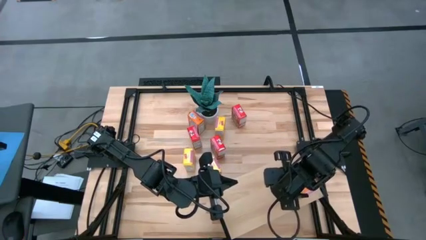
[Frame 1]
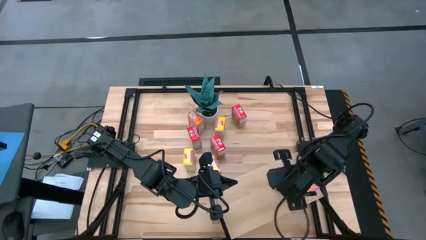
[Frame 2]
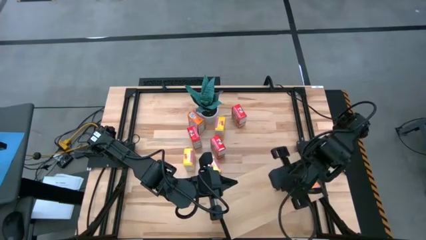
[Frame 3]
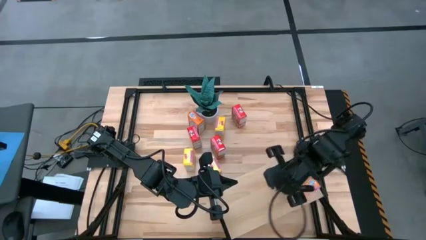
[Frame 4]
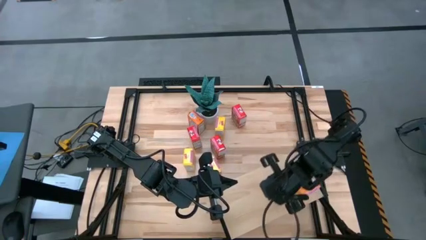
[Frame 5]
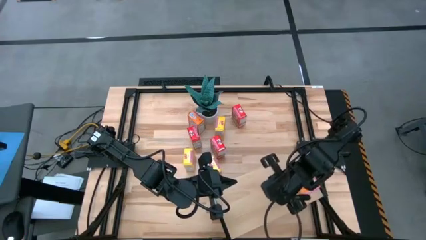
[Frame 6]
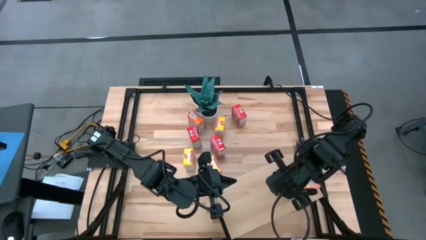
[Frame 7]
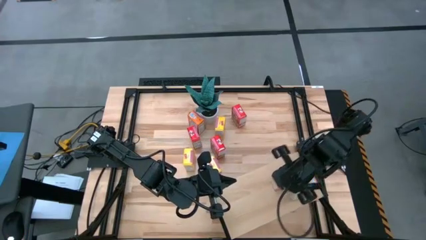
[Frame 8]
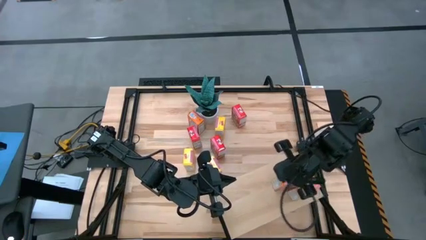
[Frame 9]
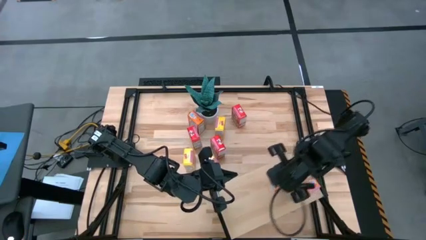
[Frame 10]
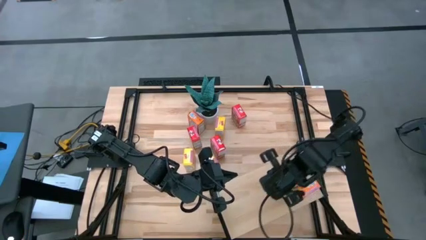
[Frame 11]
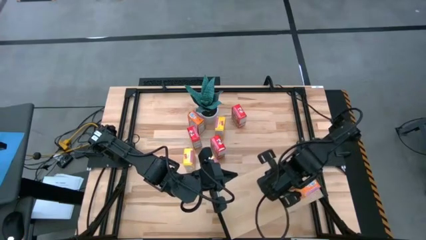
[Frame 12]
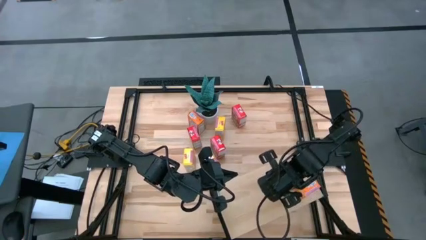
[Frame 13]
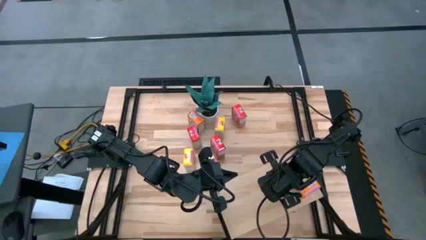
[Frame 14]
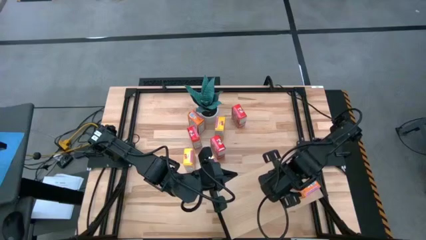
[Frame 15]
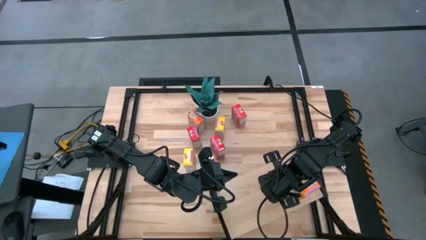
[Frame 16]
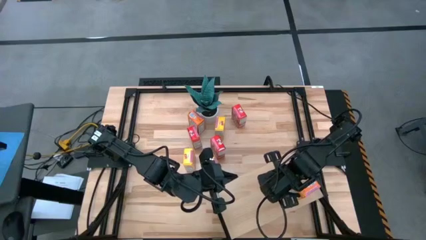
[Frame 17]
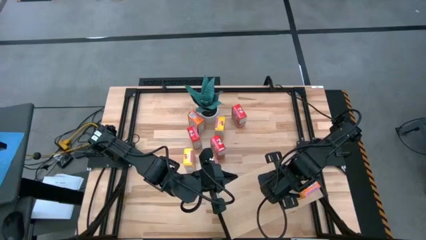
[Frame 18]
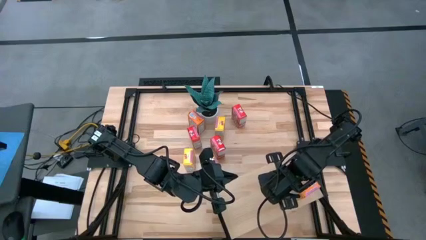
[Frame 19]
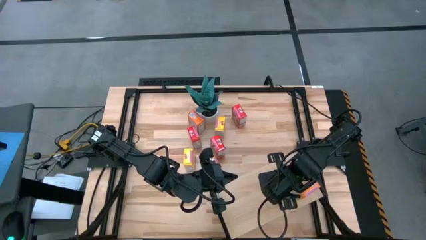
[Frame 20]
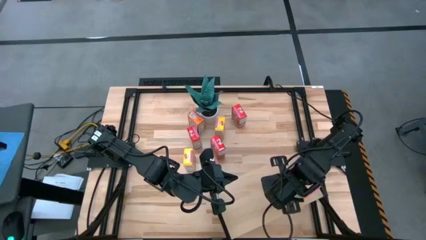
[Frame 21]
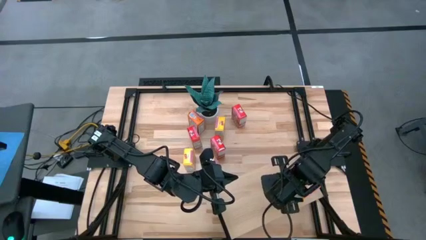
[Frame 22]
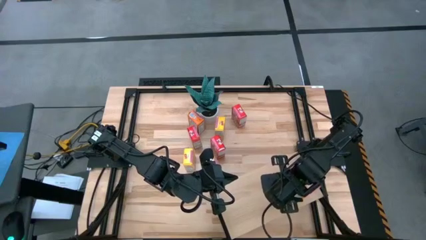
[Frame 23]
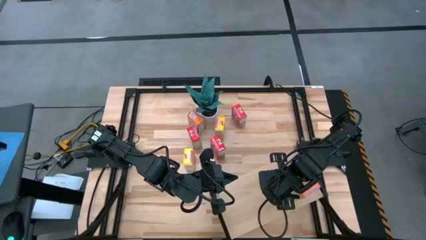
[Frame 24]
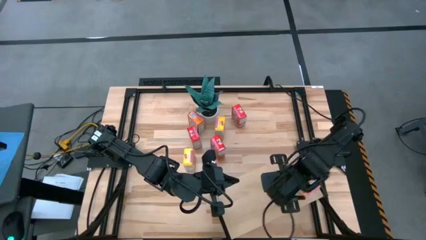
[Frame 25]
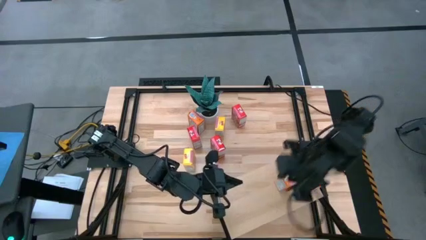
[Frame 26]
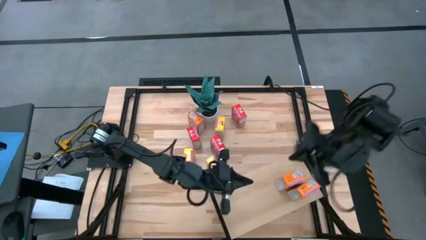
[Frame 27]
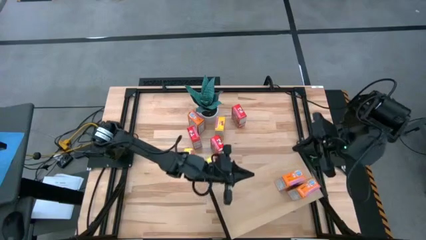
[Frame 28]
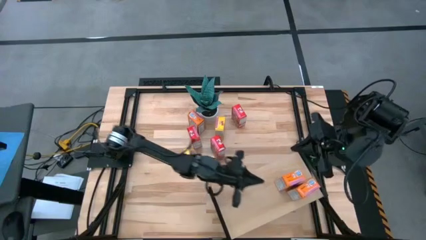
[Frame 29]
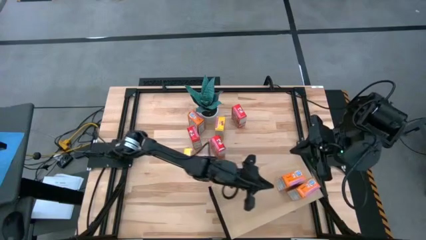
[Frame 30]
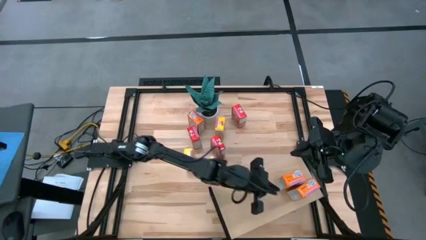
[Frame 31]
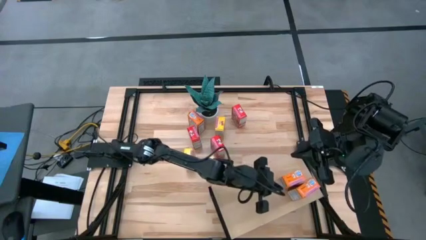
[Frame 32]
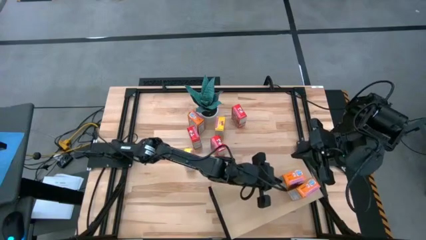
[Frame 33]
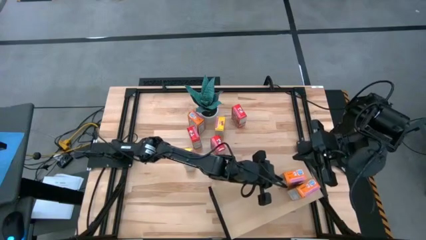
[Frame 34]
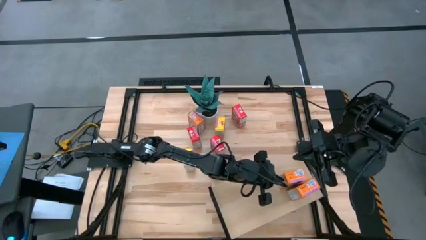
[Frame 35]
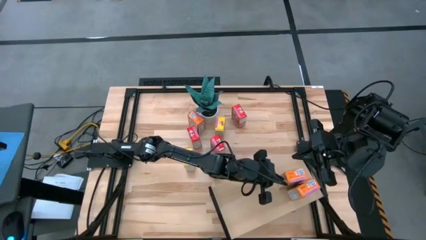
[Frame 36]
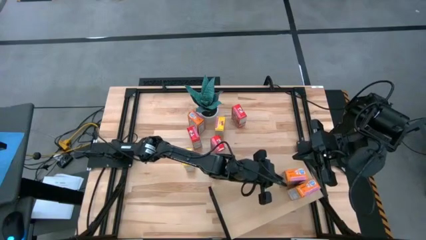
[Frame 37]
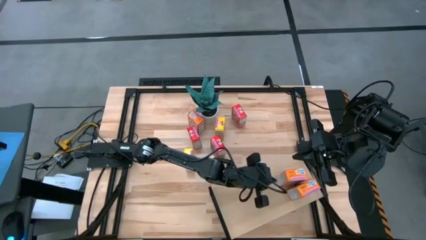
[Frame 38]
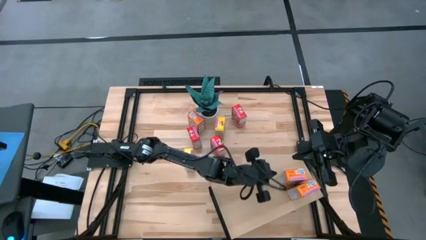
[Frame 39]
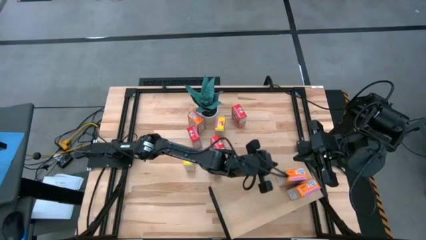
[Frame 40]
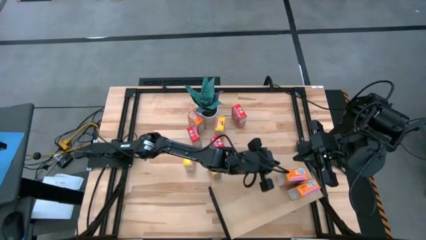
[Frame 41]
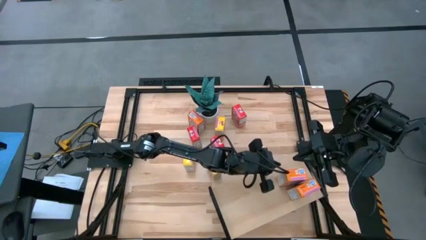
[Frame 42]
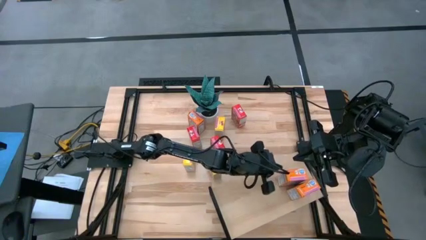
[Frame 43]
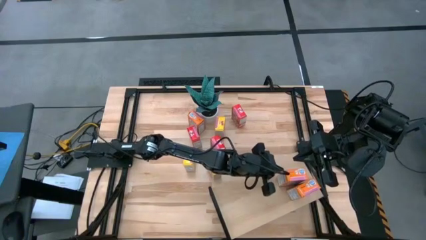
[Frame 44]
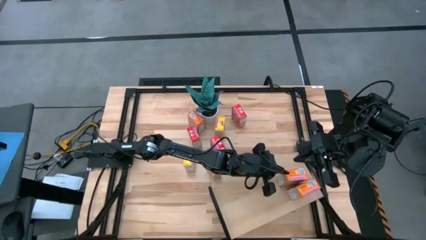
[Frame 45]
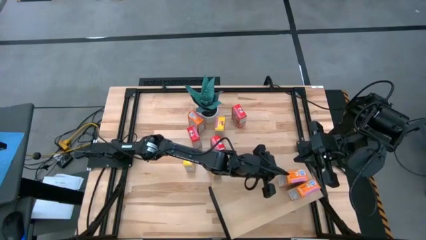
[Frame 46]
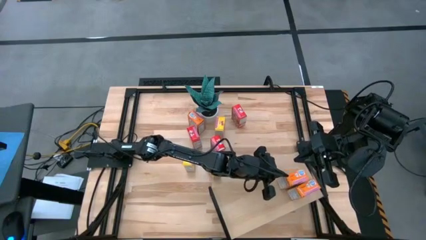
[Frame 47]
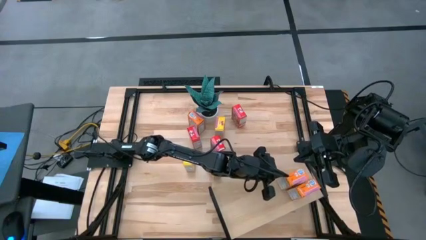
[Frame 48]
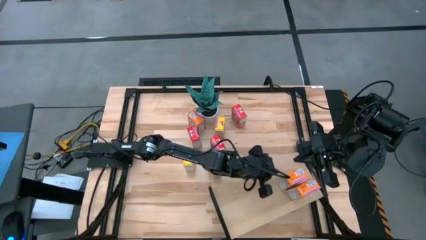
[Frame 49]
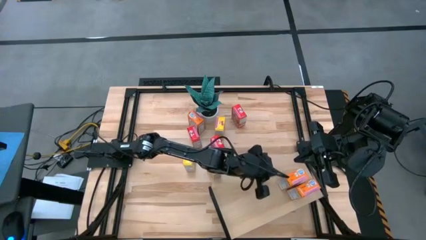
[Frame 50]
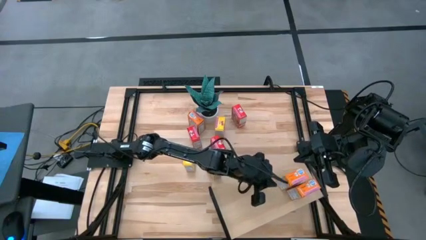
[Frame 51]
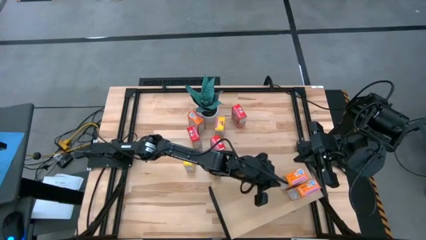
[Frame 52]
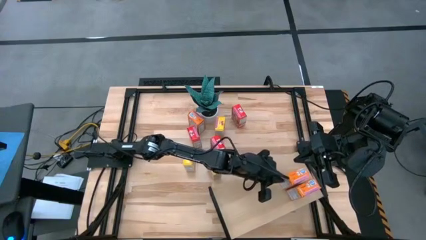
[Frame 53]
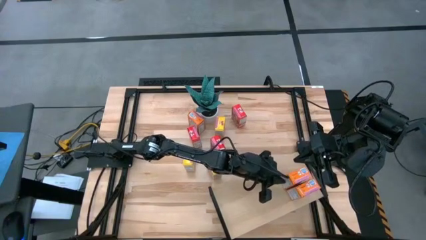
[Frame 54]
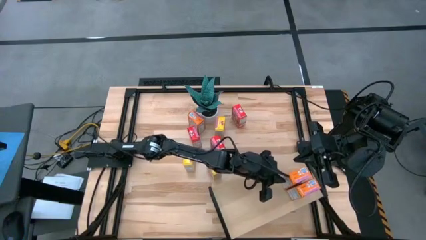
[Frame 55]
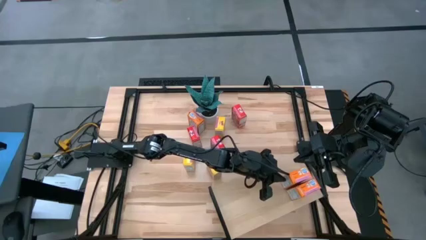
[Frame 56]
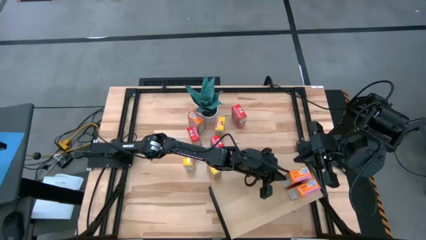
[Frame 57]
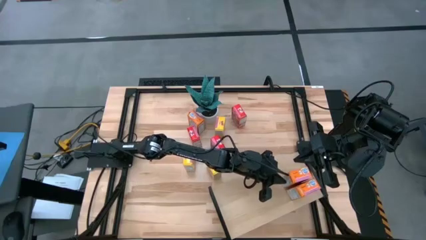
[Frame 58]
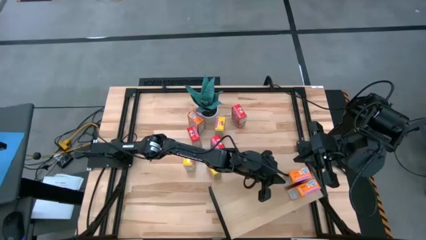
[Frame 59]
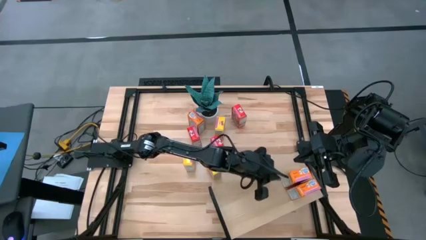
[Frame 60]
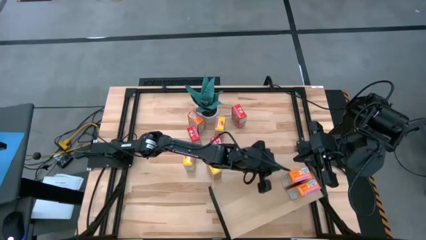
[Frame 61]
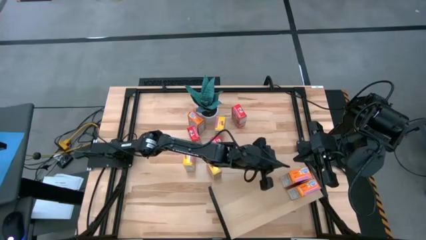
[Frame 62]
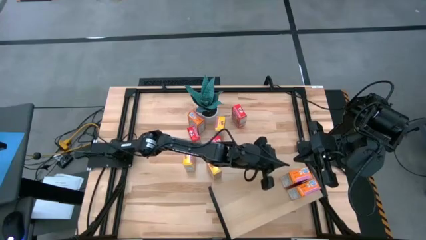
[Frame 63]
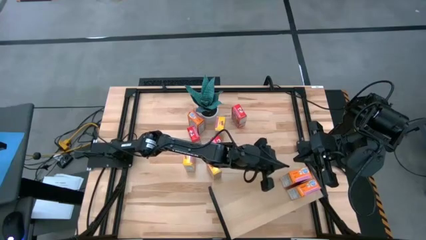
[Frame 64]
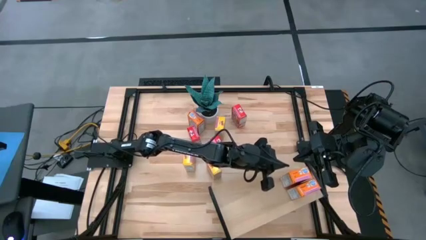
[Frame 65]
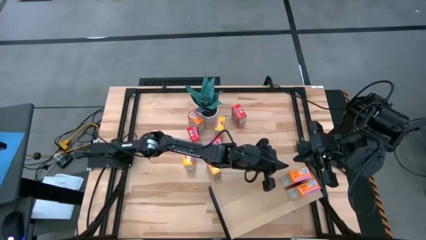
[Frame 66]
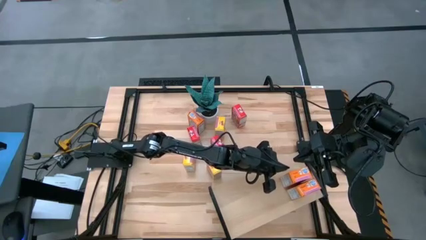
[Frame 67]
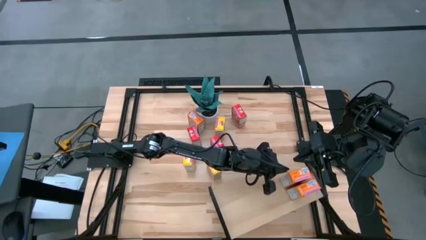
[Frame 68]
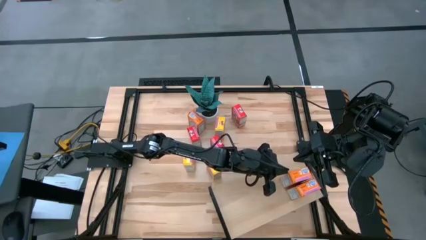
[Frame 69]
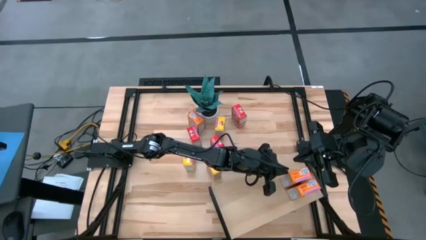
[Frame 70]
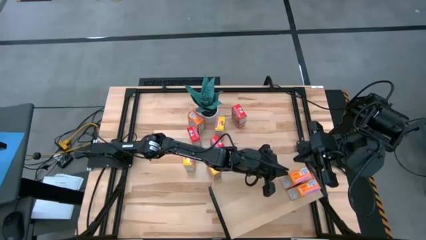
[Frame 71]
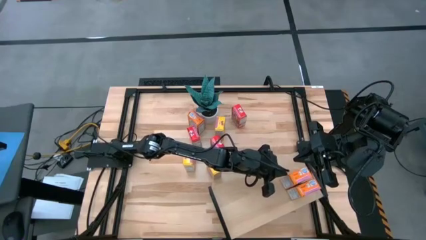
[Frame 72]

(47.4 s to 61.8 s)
Task: Stack cereal on shelf
Put the bottom orange cereal box on the shelf aligned with the other orange cereal box
